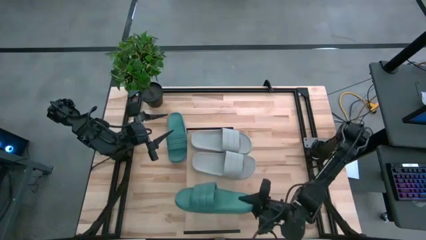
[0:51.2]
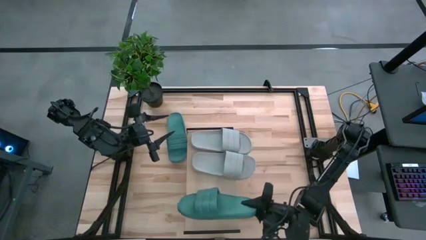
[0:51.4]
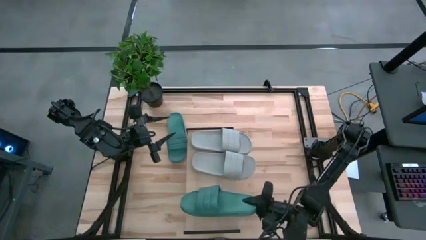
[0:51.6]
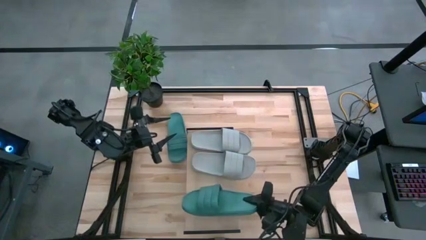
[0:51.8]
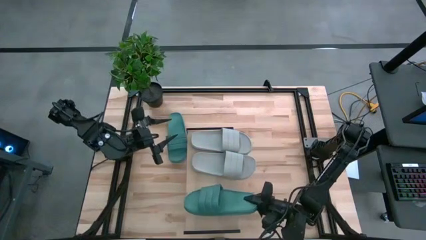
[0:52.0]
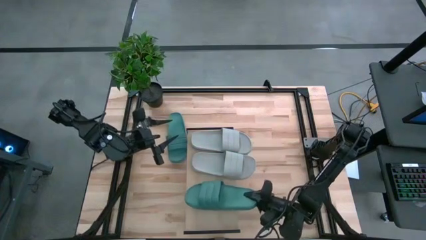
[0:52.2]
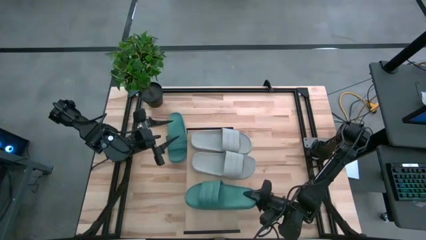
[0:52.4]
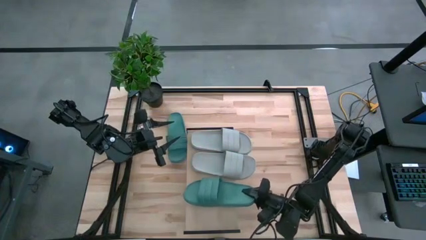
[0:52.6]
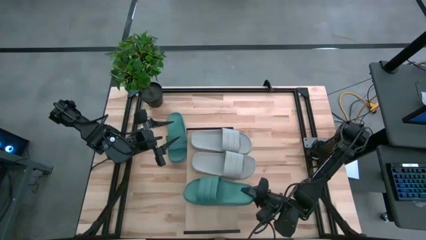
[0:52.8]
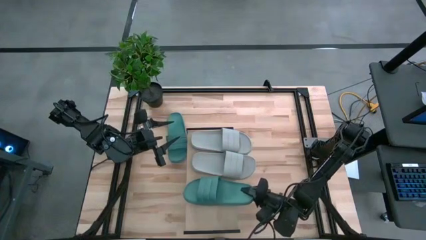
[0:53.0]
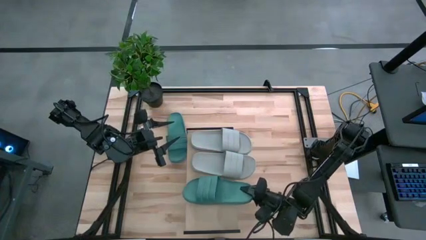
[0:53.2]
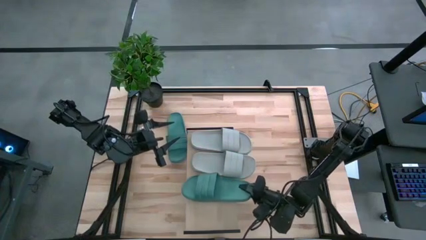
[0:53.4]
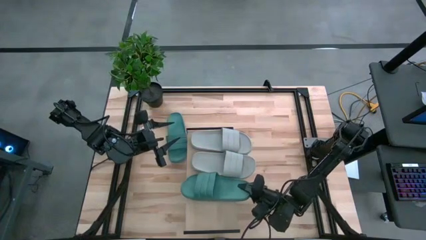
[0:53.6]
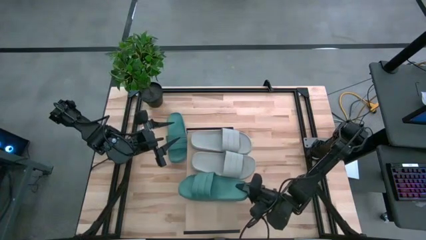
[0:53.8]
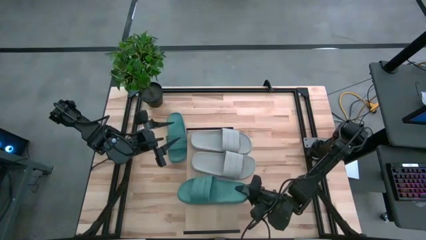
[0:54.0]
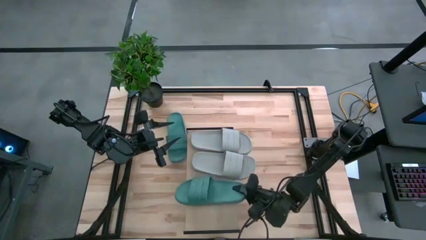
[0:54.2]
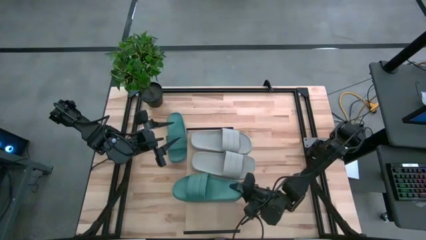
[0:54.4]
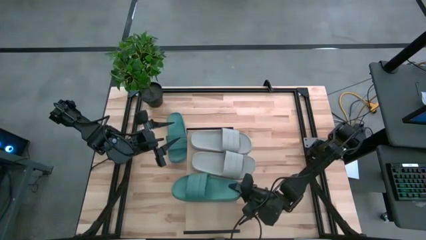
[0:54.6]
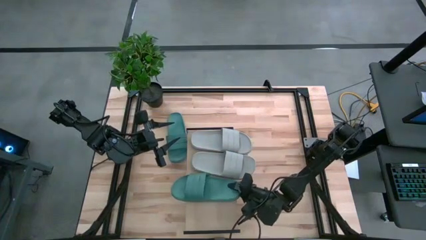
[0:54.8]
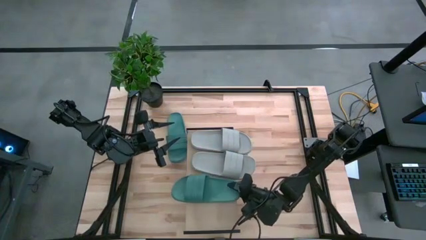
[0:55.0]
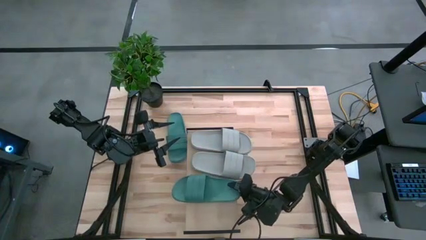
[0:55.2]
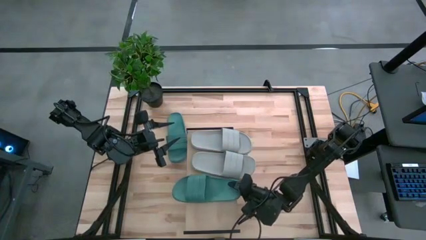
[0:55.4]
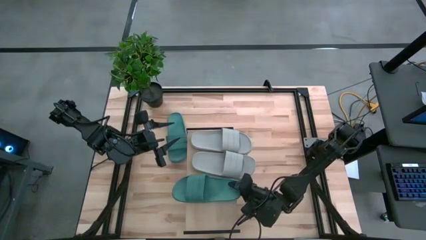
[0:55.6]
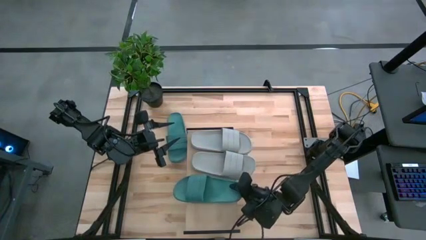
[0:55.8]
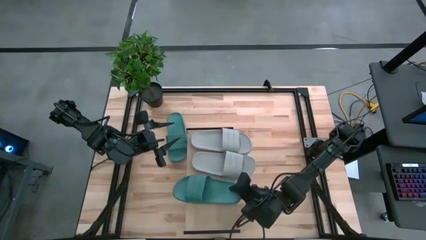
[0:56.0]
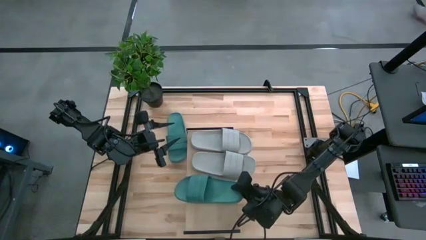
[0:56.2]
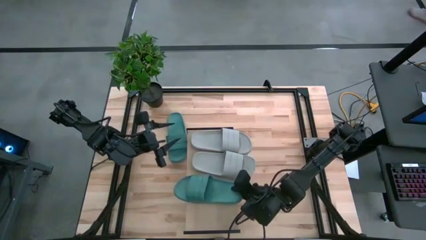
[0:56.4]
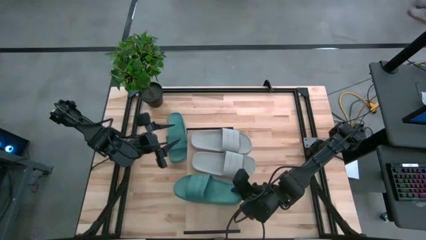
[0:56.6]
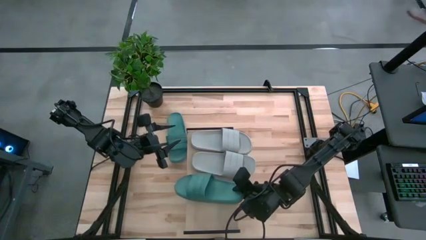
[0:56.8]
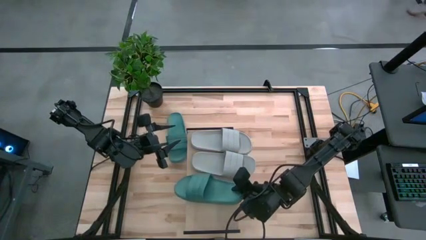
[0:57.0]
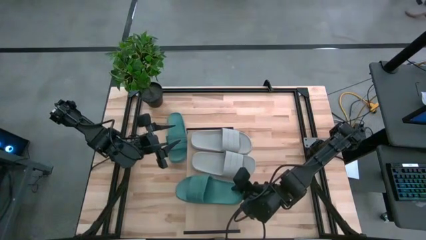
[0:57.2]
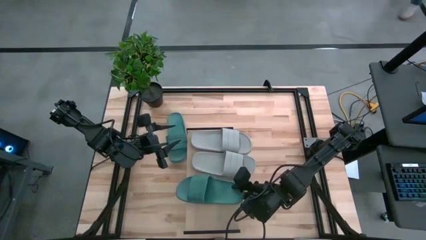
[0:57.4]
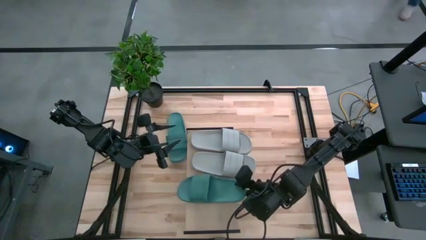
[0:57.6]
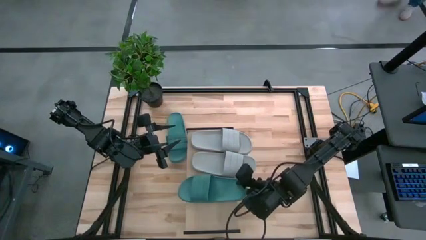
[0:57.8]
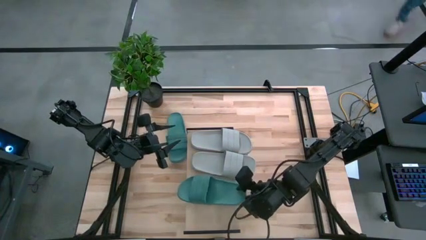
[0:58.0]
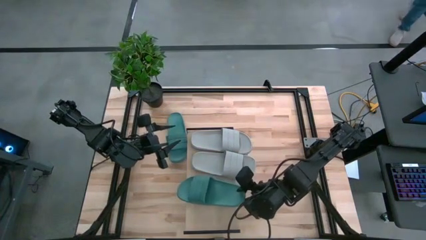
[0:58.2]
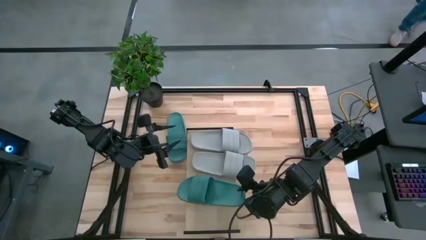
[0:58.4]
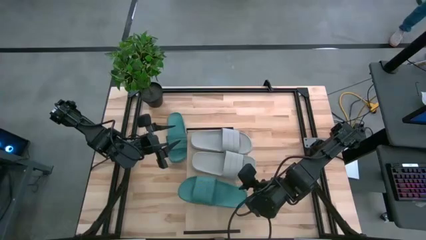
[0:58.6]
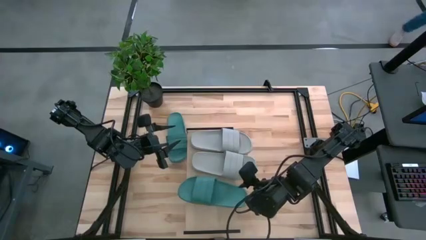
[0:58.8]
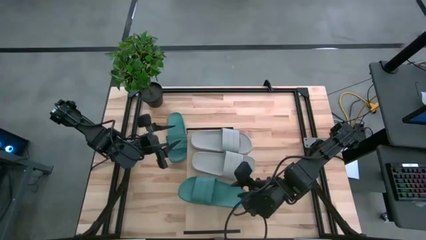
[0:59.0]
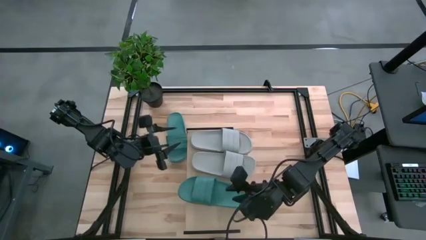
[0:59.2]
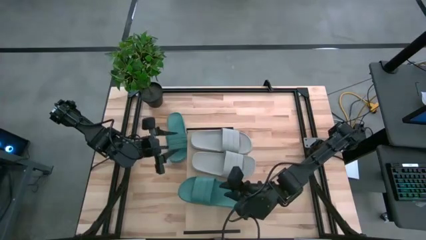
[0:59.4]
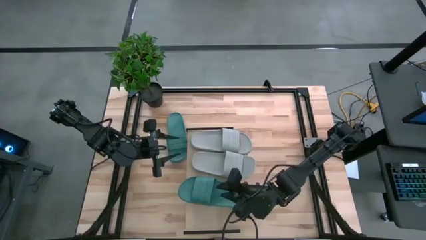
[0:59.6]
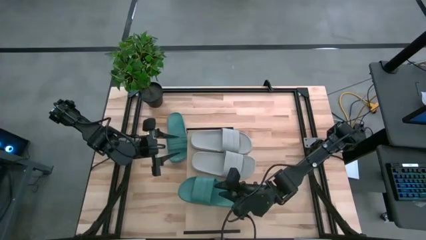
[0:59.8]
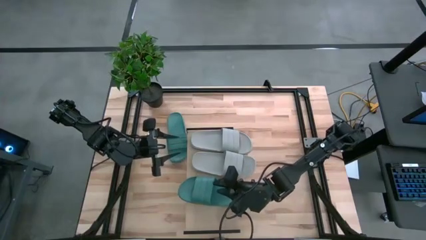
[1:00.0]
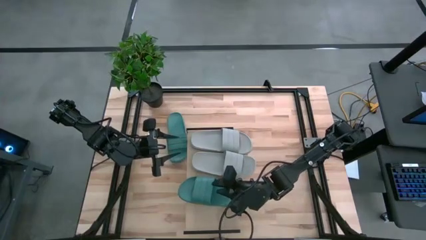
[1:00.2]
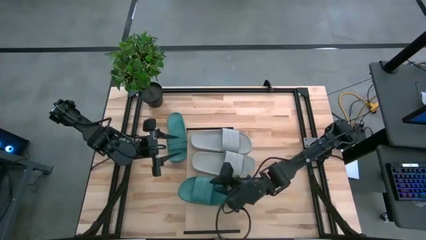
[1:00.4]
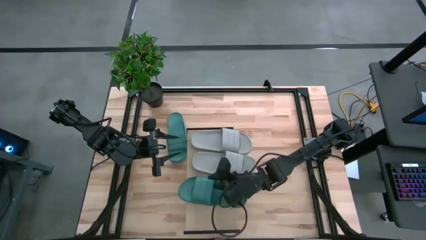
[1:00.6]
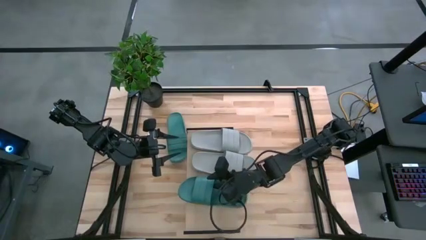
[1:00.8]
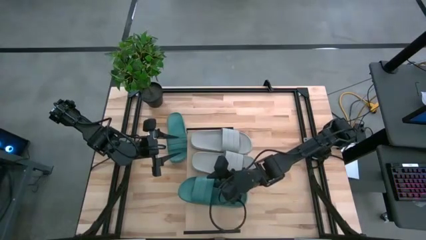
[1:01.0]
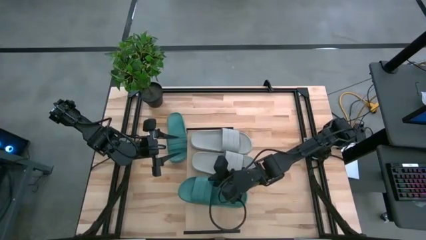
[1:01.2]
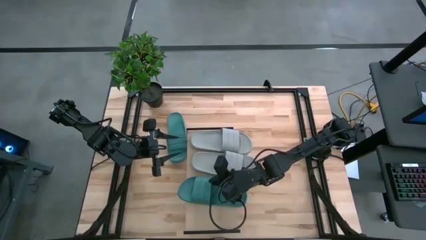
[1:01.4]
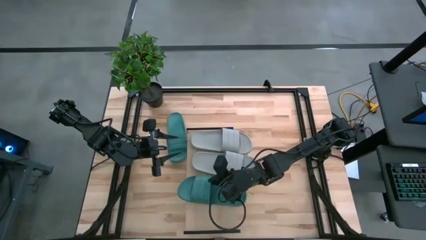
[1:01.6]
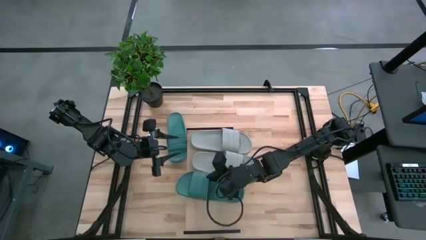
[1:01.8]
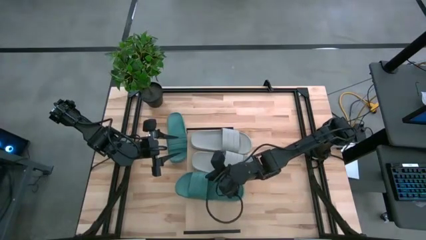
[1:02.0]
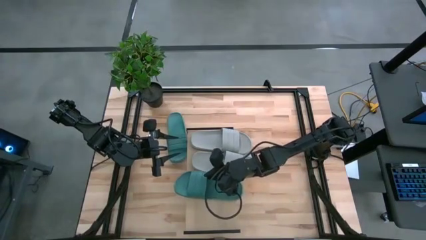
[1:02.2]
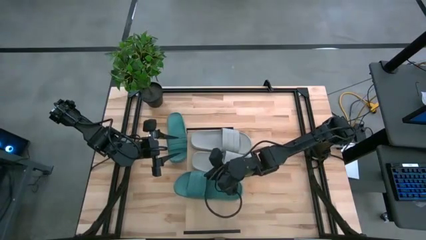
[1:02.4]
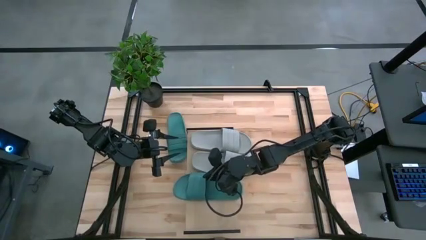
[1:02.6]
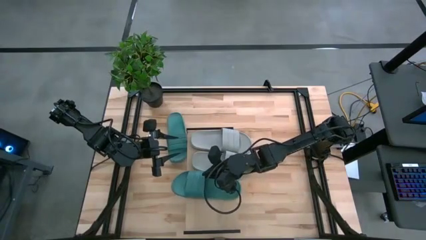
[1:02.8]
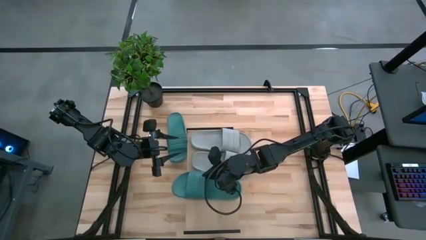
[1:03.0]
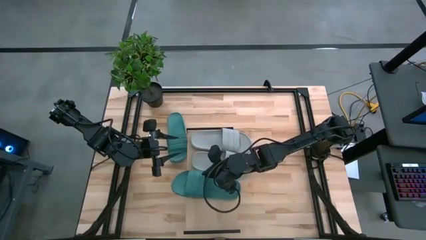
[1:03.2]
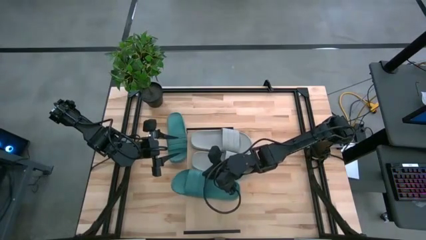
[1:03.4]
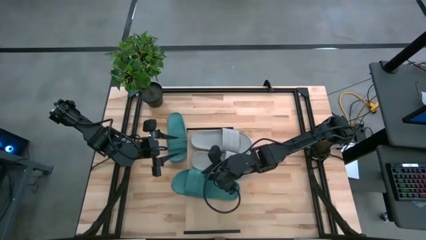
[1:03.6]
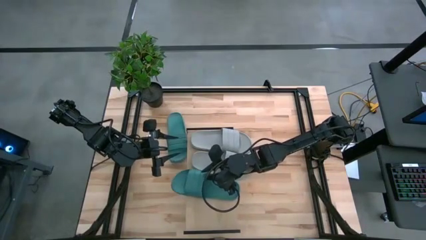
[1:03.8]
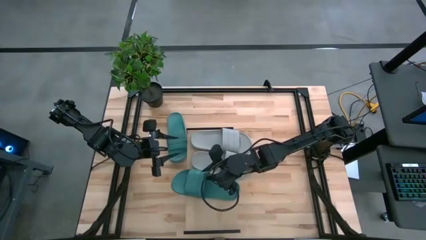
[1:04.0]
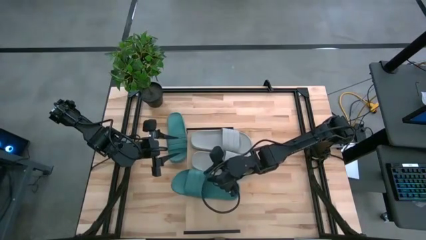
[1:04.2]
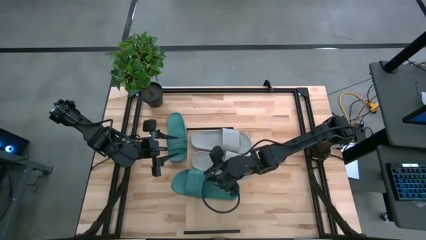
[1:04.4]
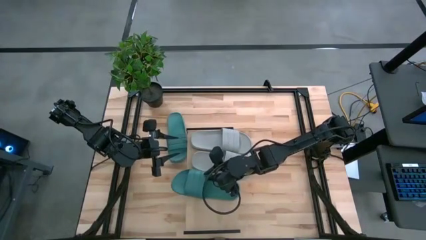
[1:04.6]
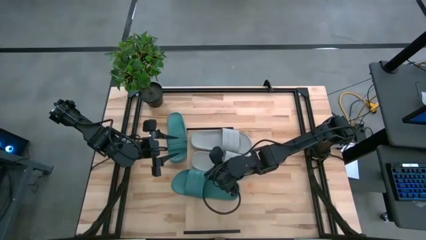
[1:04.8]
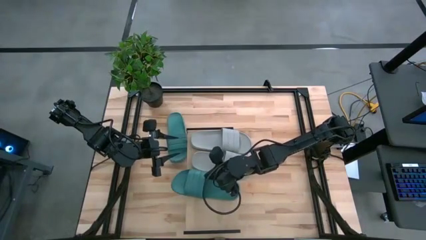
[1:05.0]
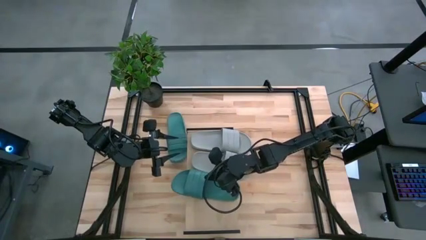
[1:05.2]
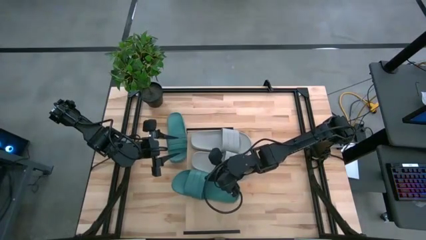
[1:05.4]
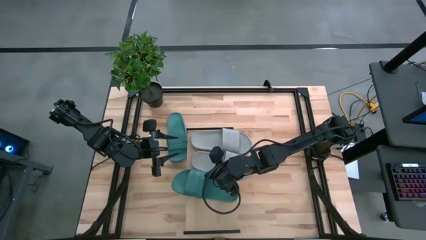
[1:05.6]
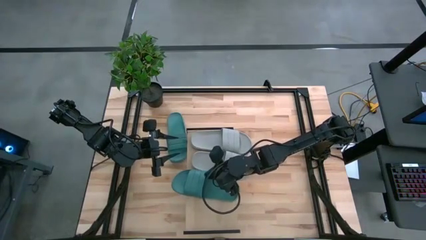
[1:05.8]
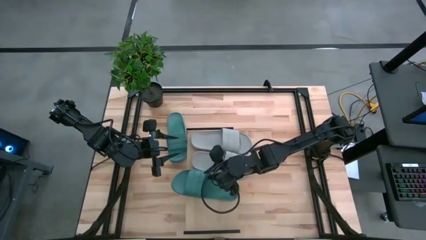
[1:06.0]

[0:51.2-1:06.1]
Task: Pick and place slides into the shelf
Put the left green slipper on the shelf
